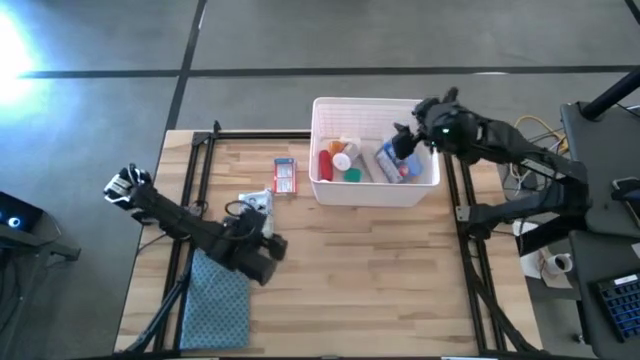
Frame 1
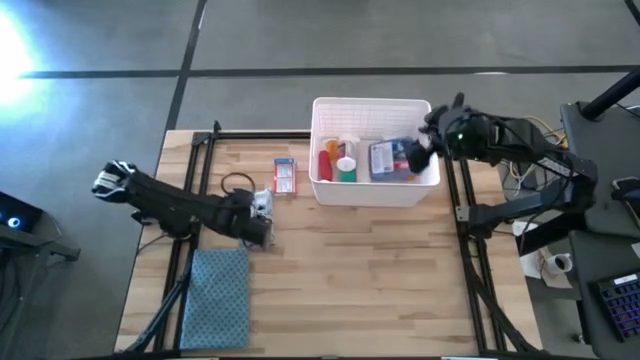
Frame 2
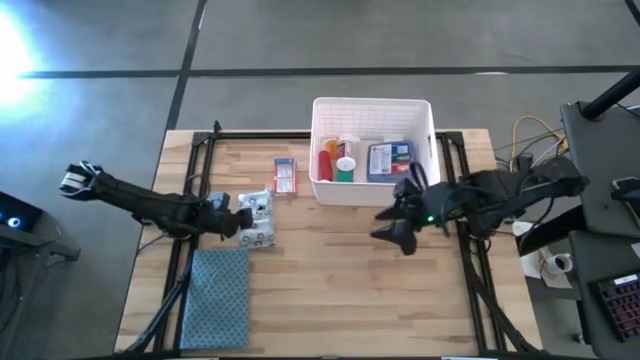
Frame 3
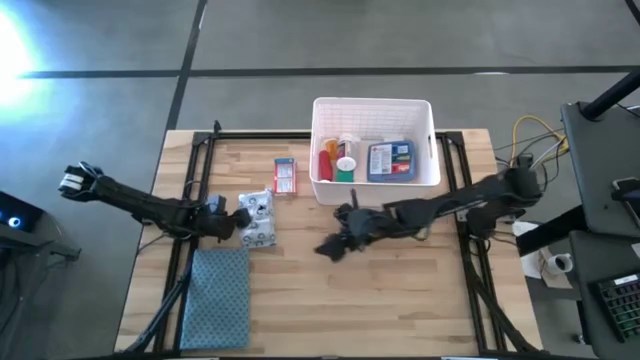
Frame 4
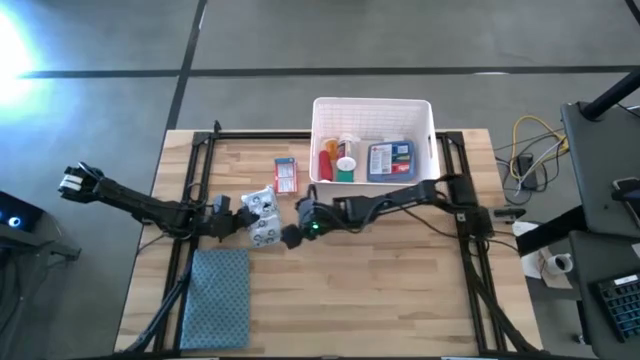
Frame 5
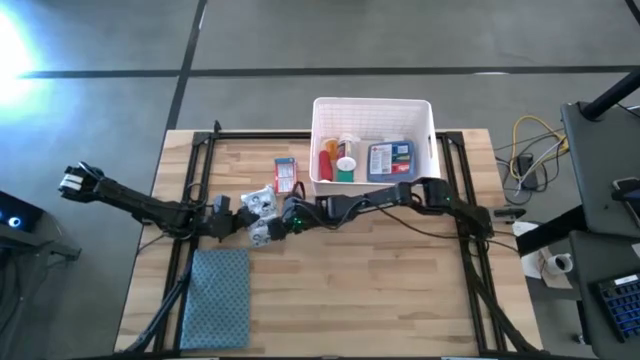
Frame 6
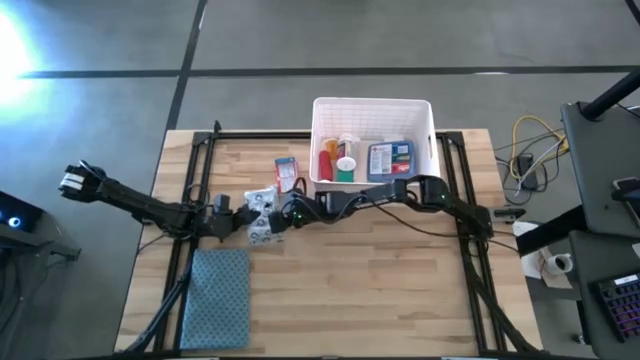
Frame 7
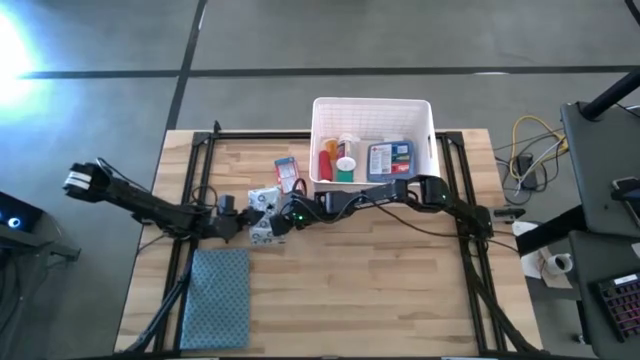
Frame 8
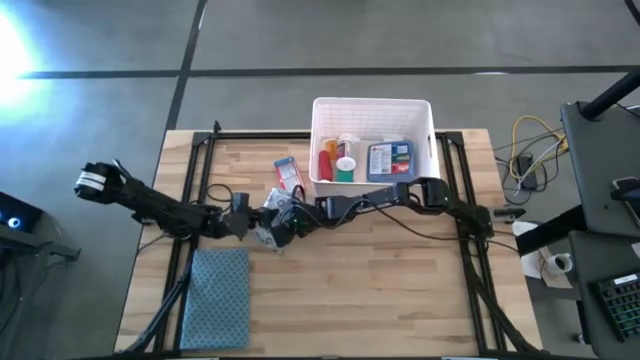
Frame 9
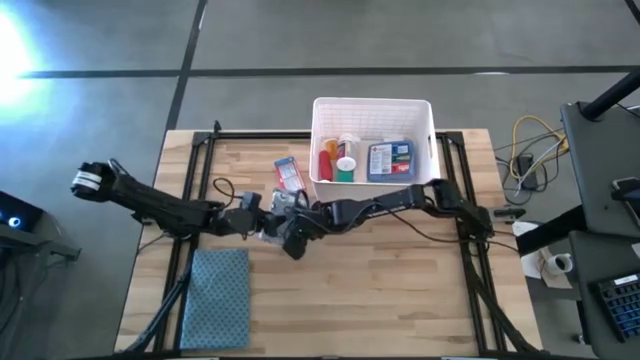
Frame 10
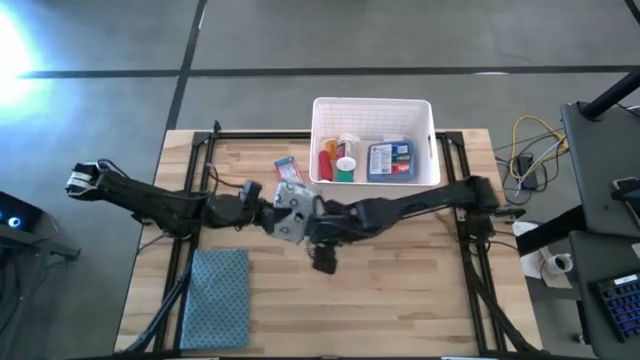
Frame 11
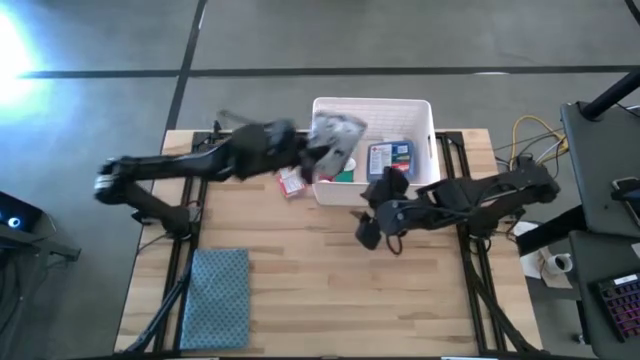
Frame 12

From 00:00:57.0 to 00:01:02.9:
Task: Pick & place medical supplies in basket/bin
Put the white mailer bag into the bin

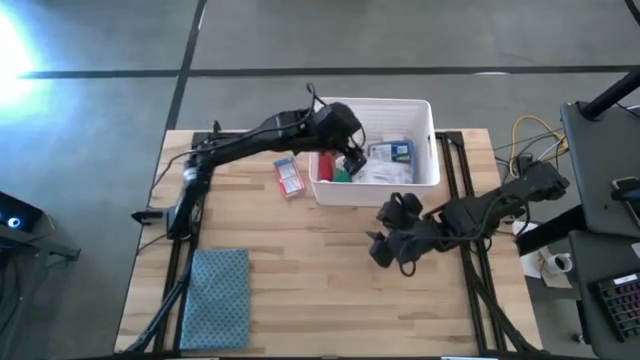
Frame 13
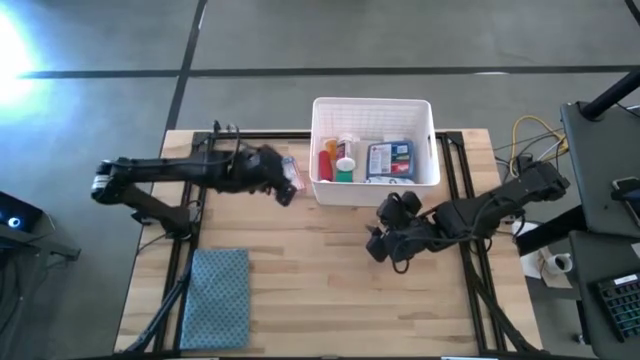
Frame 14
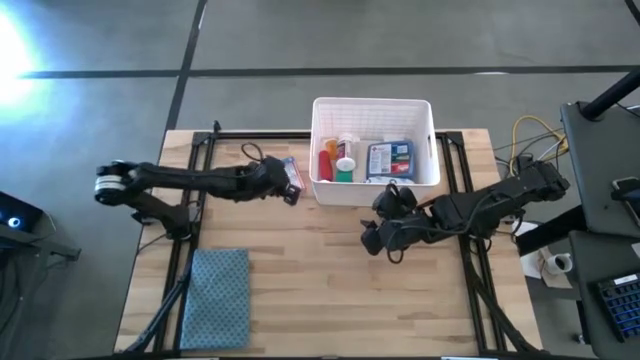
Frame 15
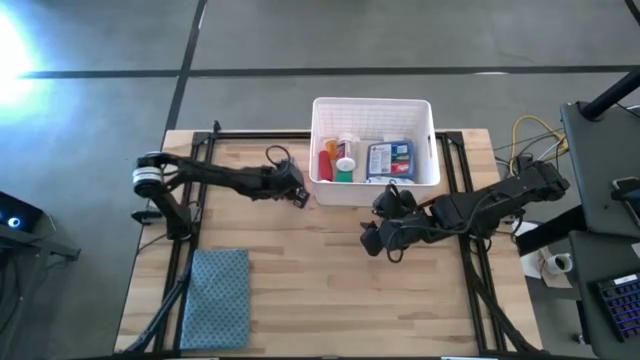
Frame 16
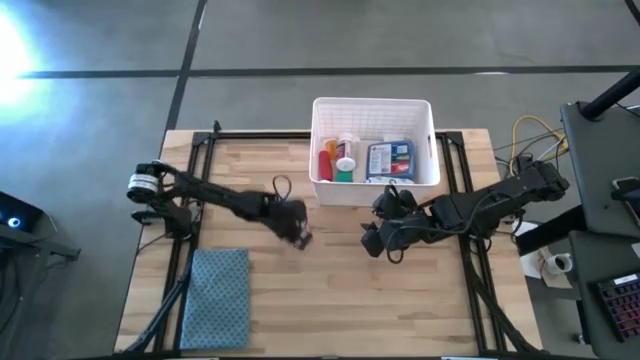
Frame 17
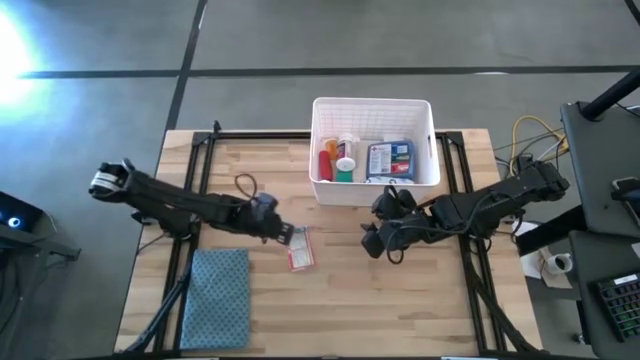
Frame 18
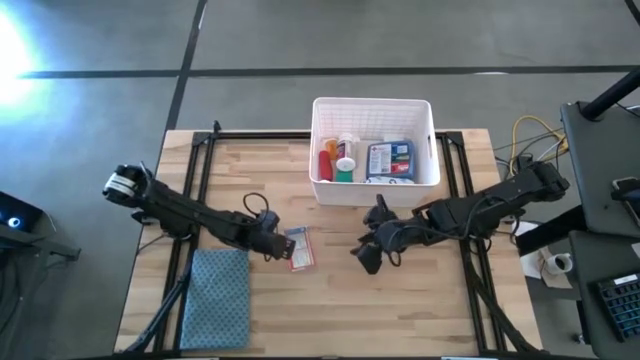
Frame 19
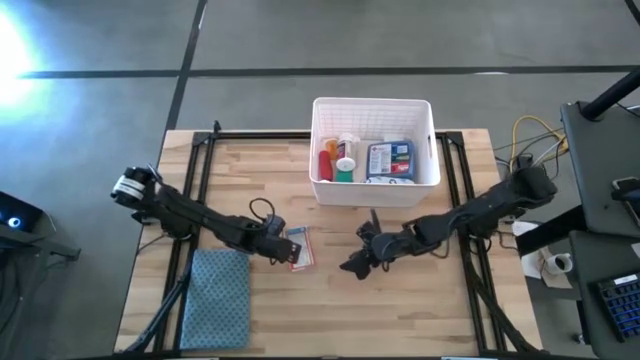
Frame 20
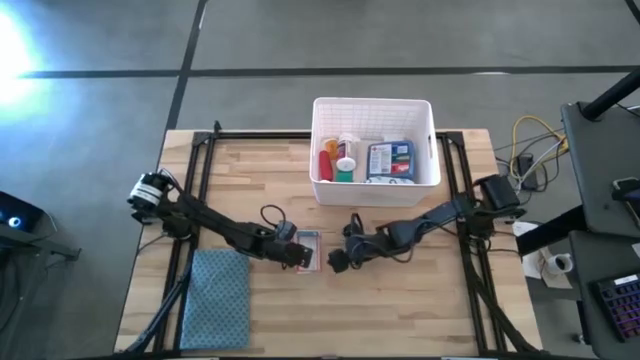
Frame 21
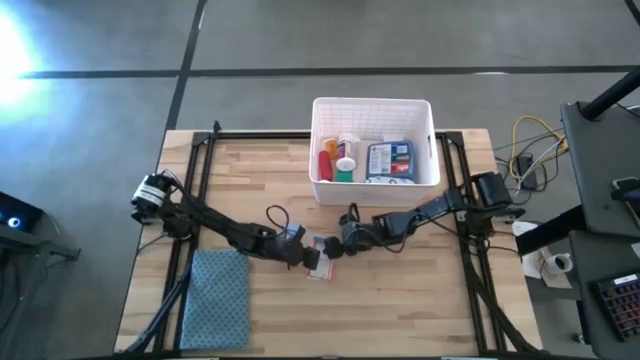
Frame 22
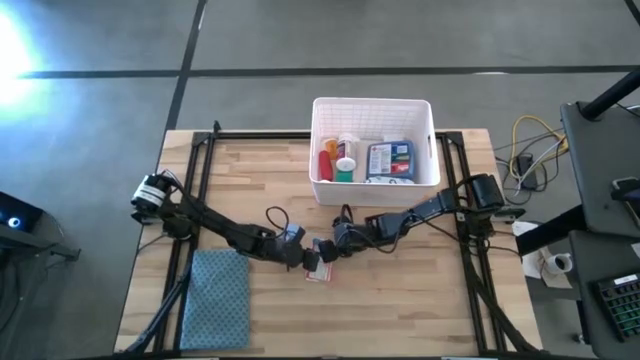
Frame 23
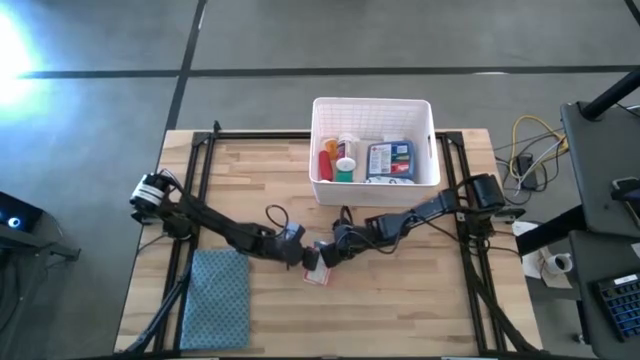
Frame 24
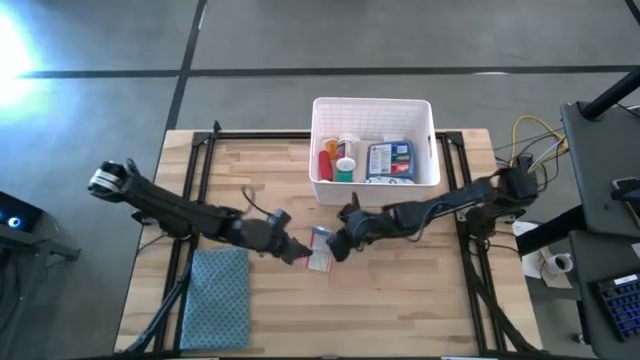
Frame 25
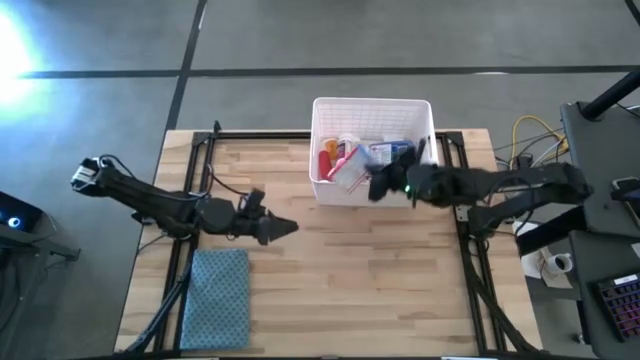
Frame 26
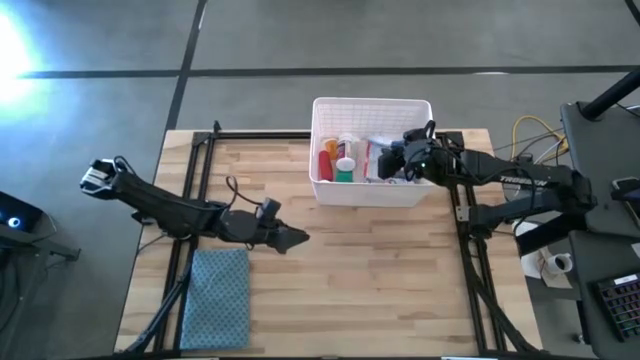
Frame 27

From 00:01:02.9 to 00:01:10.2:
Put the red medicine box into the bin

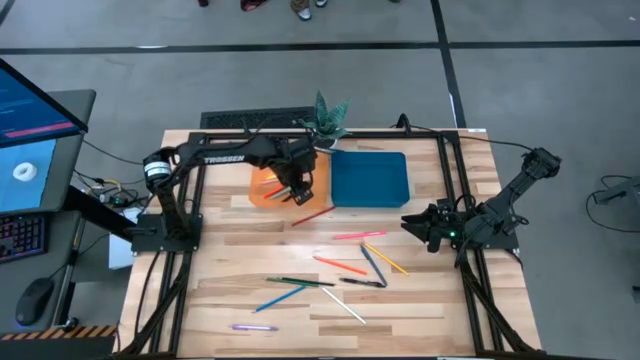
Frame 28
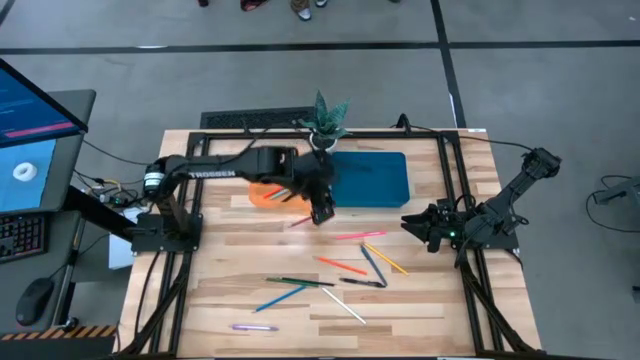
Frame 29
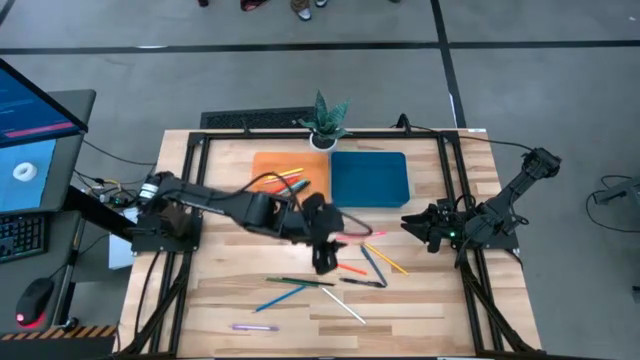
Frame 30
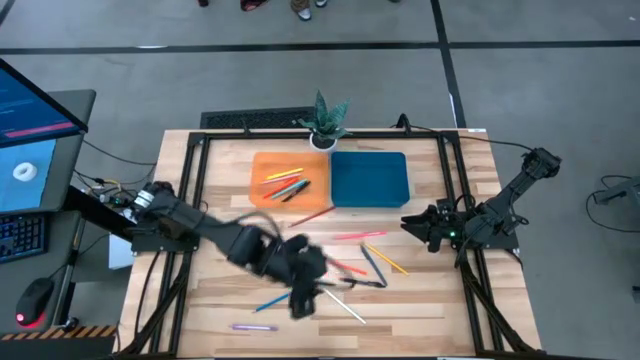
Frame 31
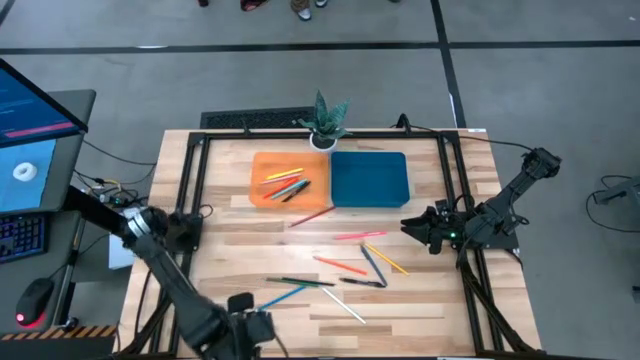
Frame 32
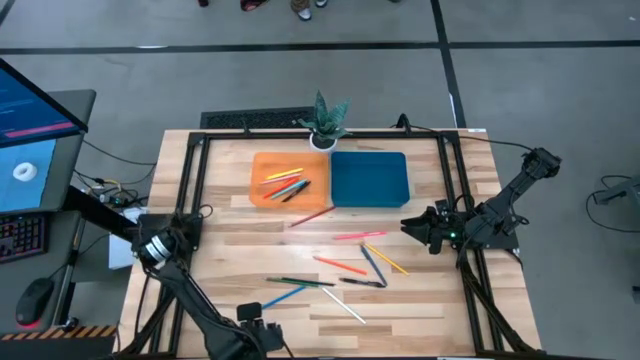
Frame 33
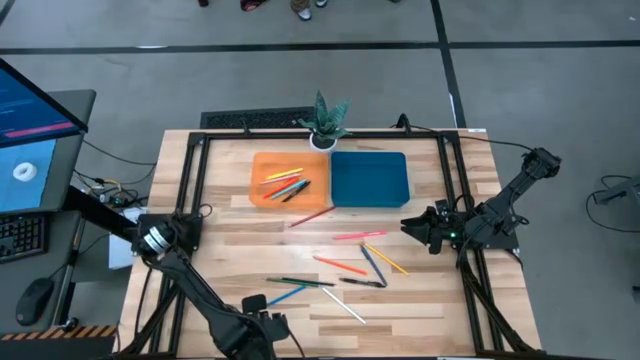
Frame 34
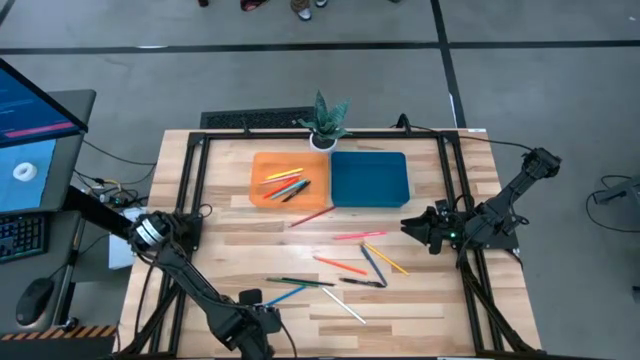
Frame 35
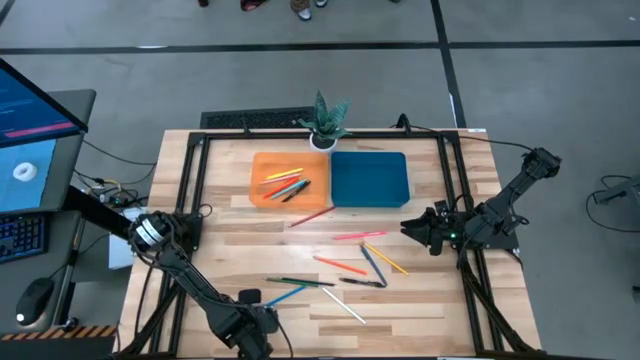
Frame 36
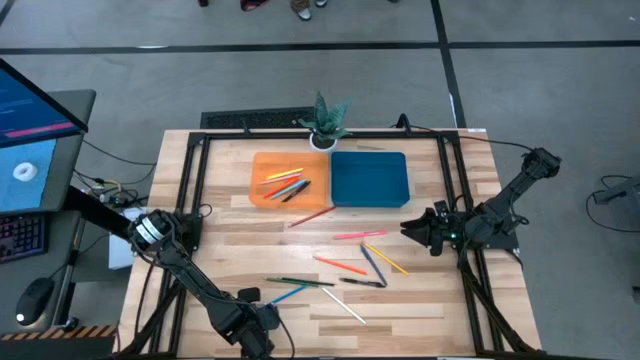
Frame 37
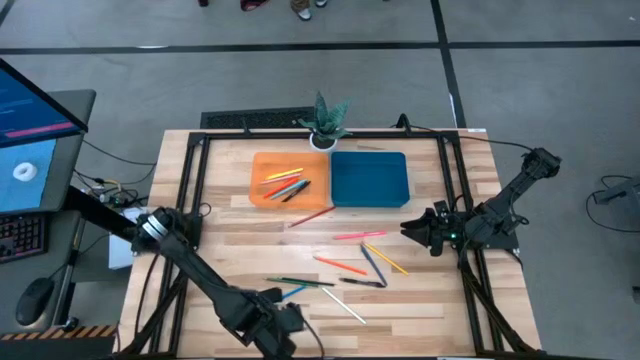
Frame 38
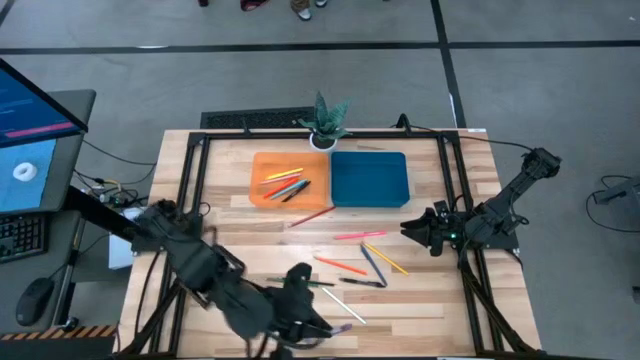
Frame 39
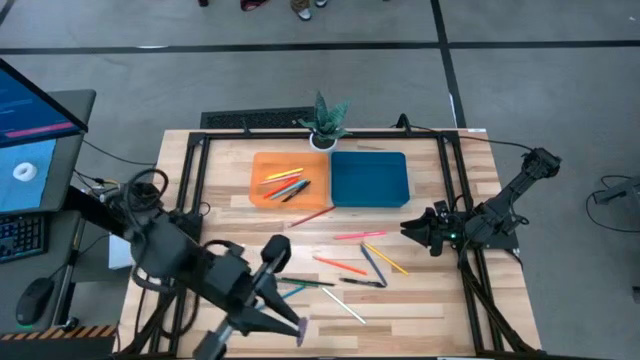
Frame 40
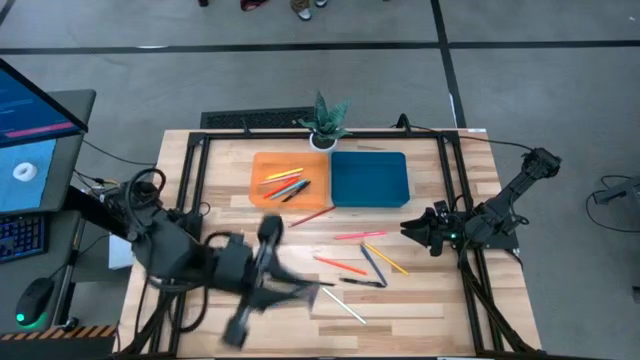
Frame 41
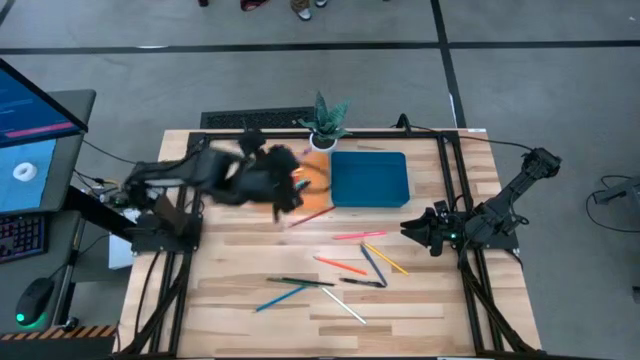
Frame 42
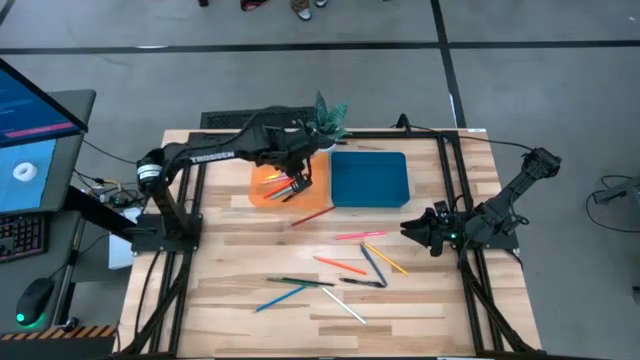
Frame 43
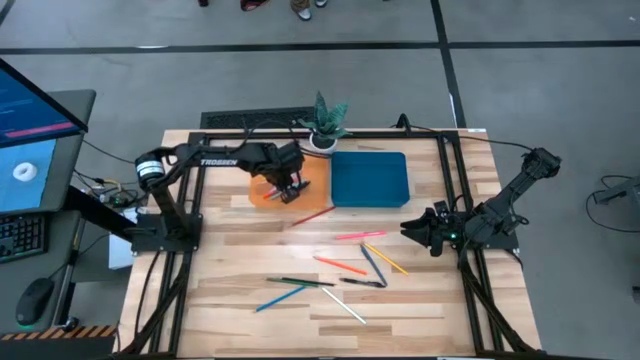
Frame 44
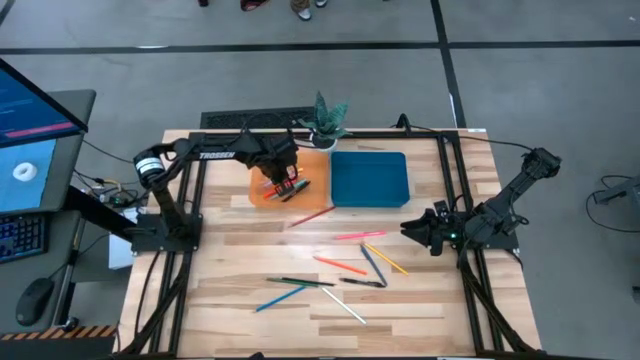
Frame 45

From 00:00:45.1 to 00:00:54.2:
Task: Sort pens & pencils
Put the purple pen into the orange bin
